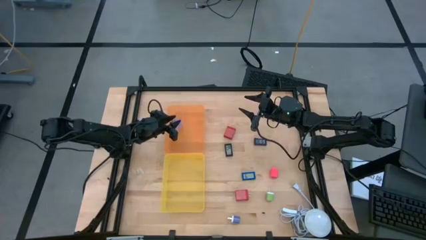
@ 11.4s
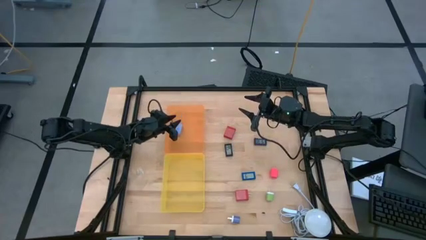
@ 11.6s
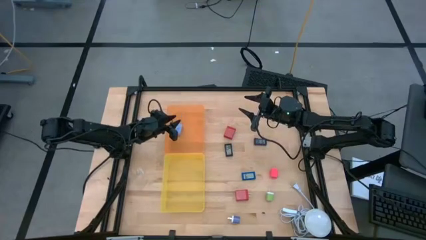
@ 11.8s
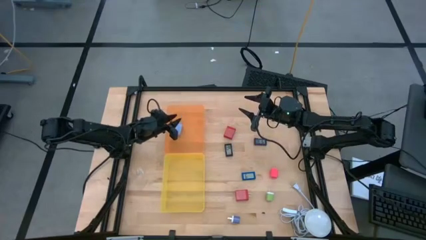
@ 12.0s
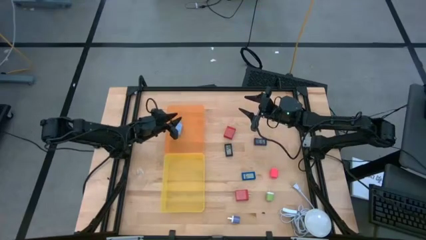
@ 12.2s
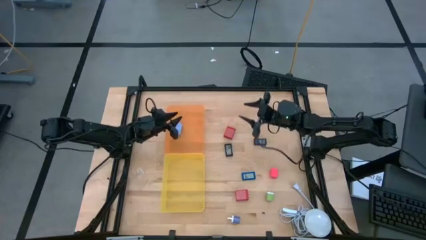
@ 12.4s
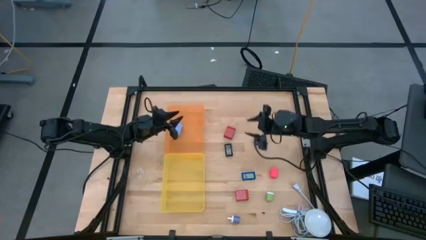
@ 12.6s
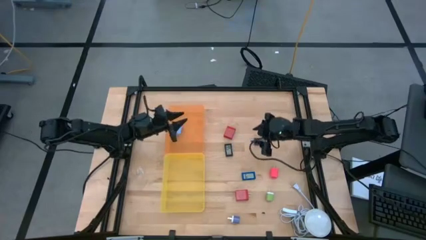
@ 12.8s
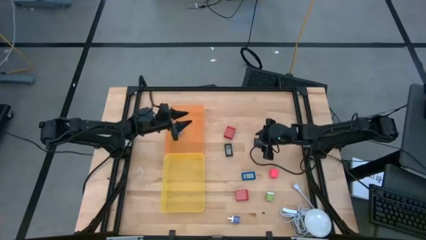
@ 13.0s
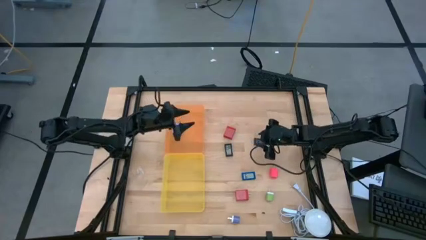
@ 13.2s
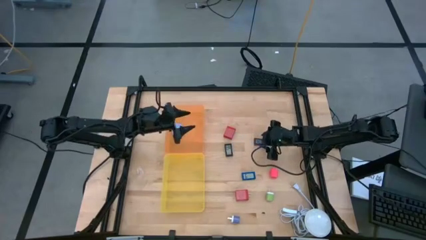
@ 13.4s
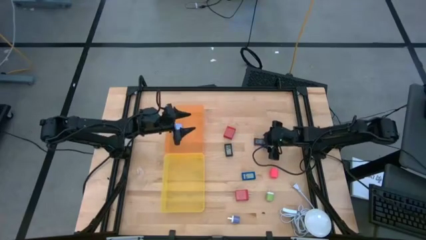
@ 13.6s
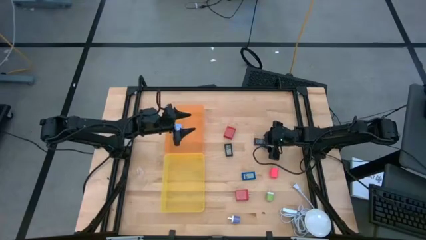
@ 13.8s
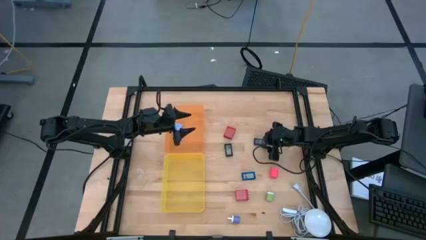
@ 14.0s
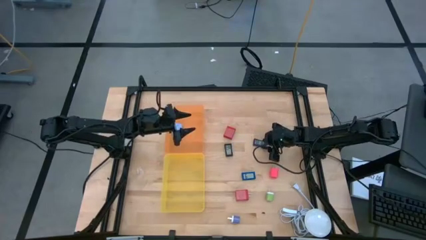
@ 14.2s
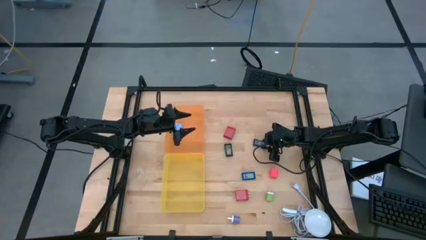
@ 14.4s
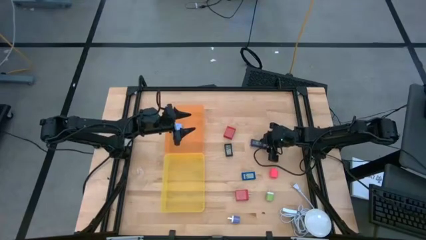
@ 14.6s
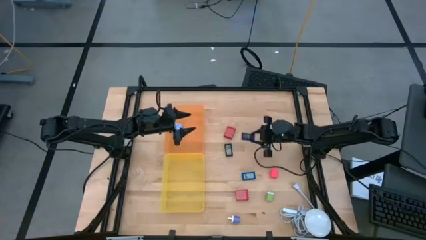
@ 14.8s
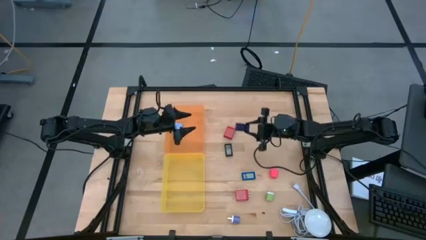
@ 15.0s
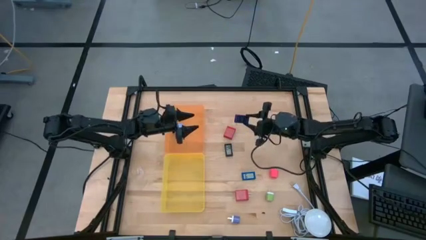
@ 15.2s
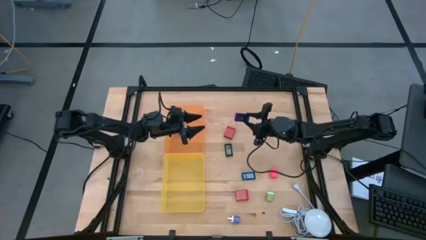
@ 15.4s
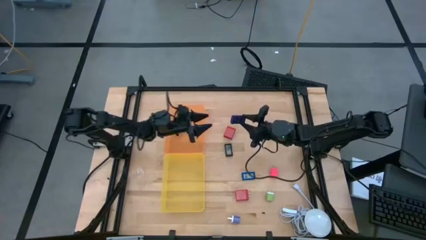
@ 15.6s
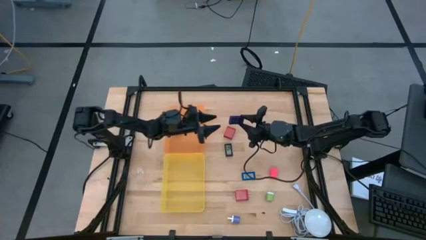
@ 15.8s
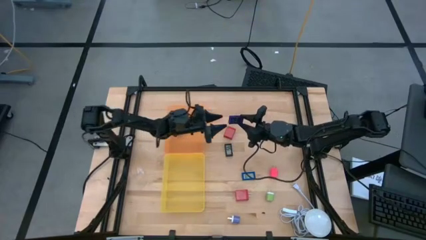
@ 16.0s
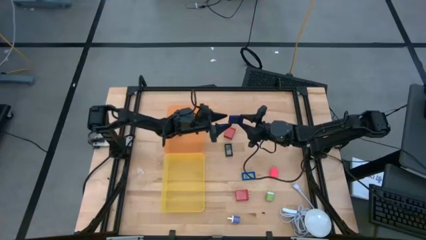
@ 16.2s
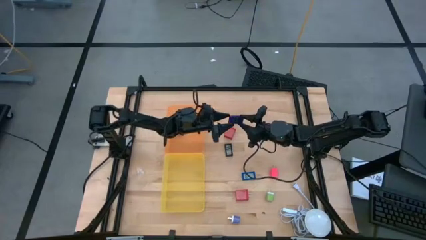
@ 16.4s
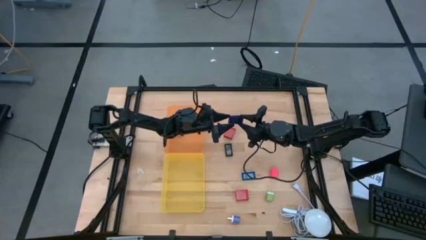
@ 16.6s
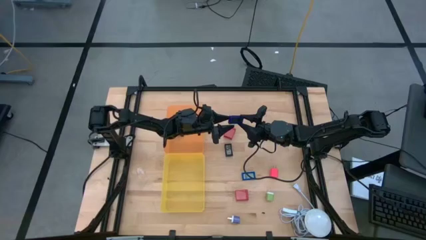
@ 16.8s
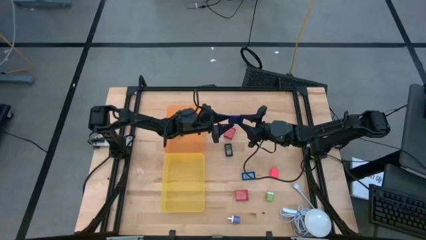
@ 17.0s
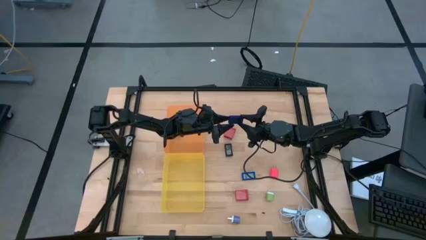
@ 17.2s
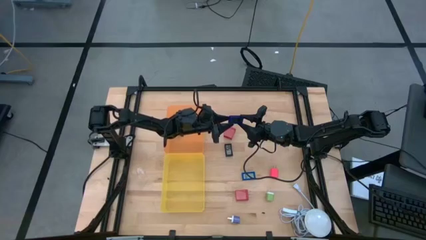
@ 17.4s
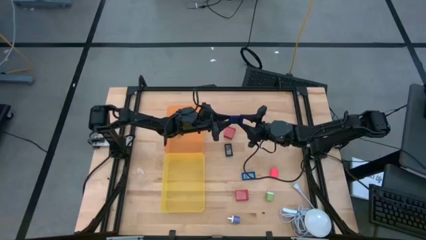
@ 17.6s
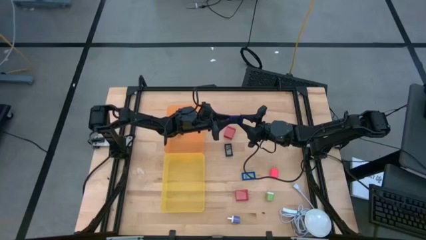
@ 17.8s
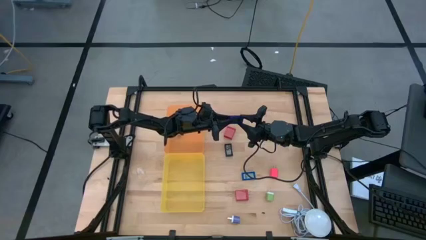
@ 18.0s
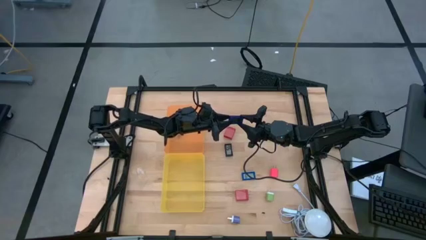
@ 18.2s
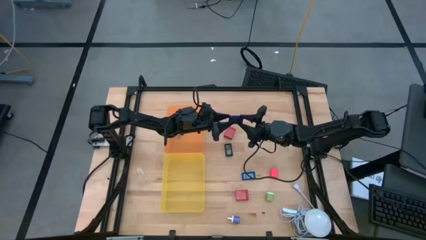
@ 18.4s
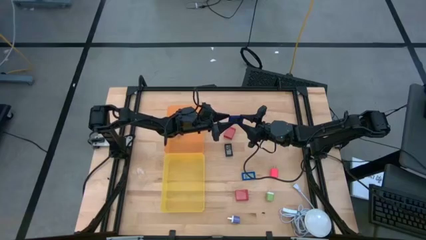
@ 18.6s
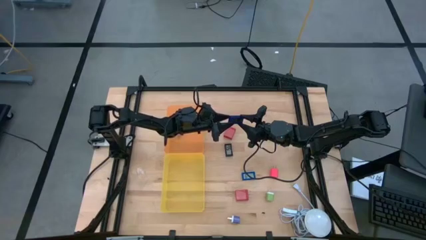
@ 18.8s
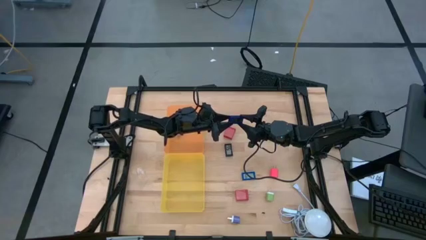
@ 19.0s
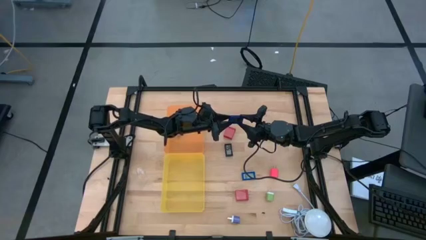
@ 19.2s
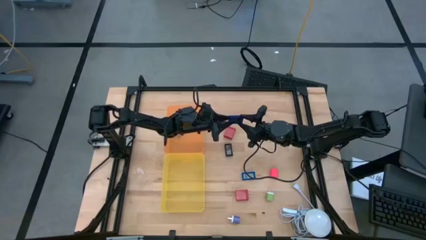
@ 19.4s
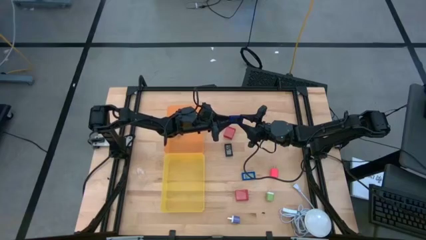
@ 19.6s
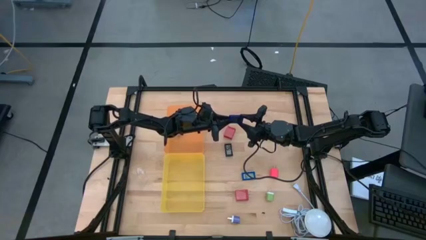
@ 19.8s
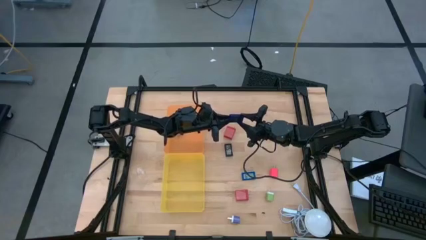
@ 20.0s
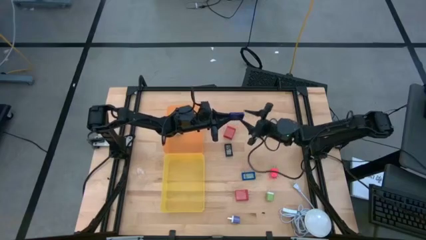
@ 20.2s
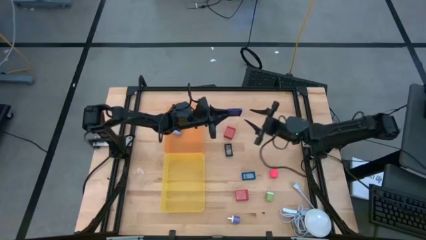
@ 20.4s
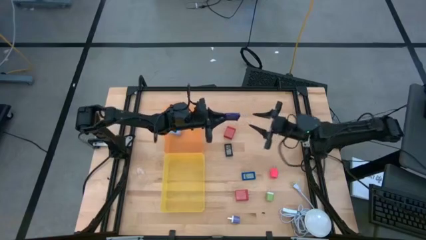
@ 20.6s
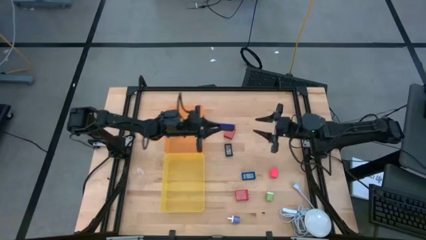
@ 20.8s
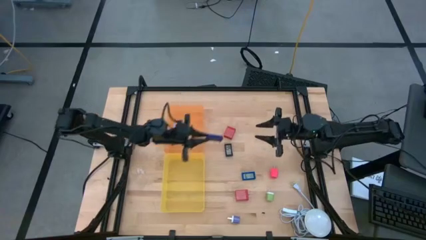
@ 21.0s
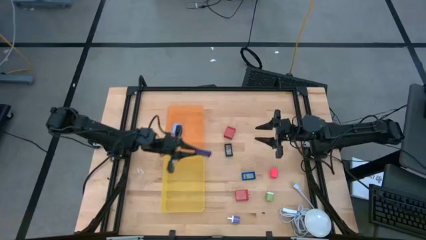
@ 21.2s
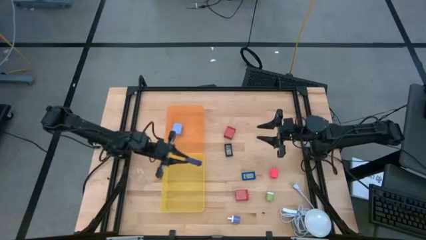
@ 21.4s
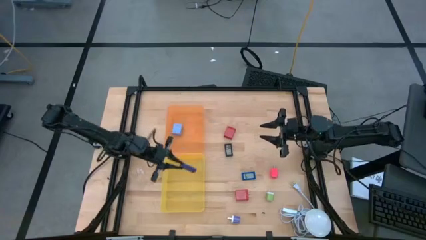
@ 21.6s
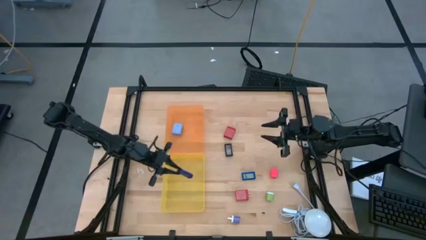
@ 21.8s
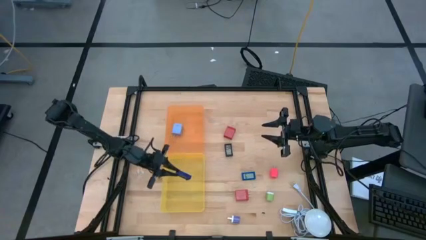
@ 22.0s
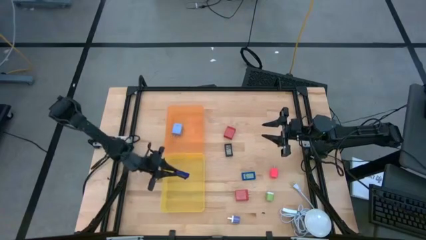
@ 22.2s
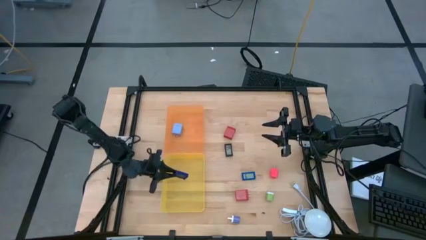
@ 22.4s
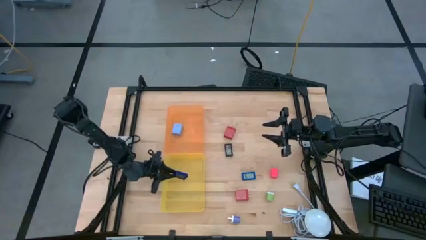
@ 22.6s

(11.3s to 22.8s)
Task: Sort adapters and digital timers
Put the dark blue digital timer into the yellow bin
